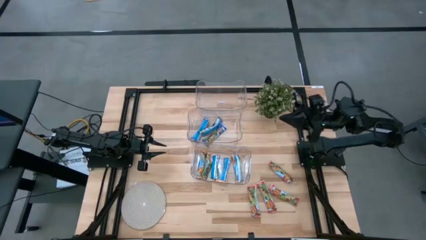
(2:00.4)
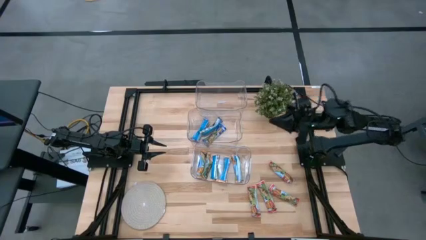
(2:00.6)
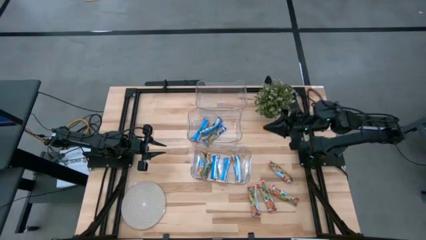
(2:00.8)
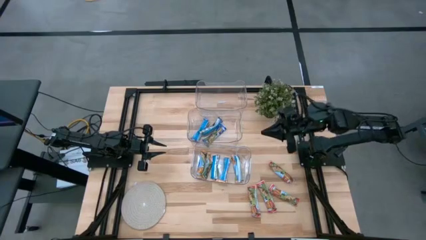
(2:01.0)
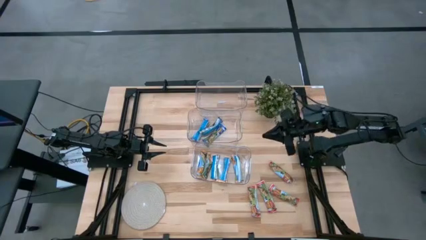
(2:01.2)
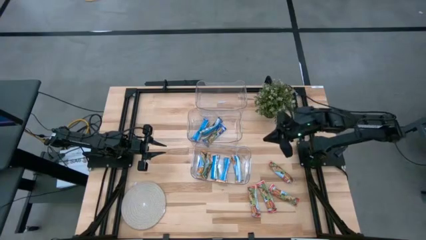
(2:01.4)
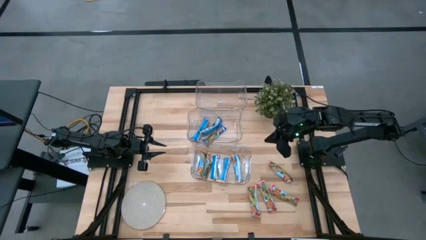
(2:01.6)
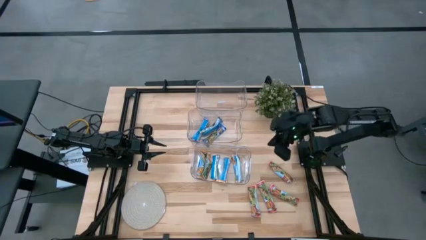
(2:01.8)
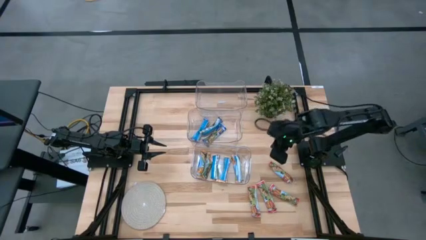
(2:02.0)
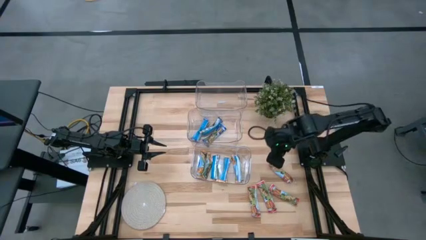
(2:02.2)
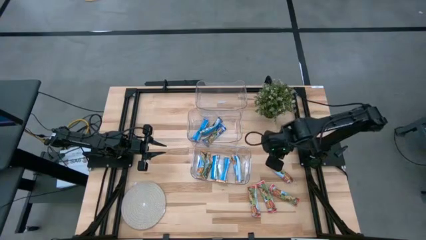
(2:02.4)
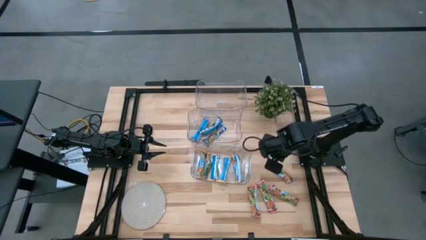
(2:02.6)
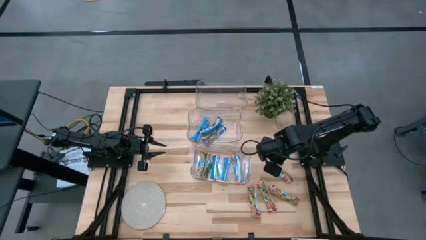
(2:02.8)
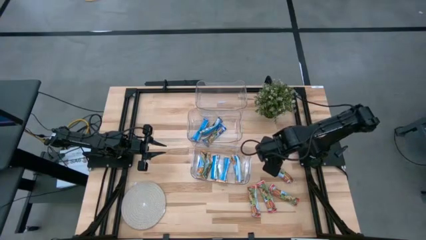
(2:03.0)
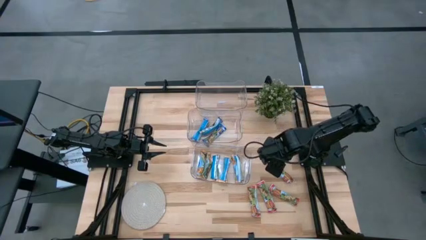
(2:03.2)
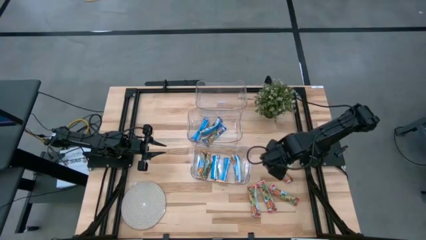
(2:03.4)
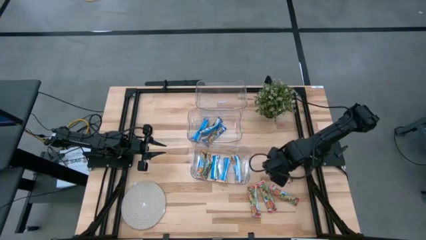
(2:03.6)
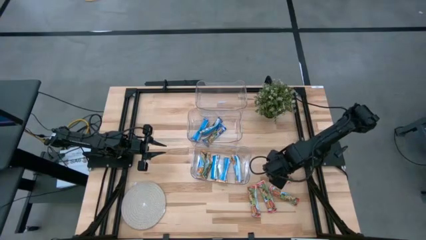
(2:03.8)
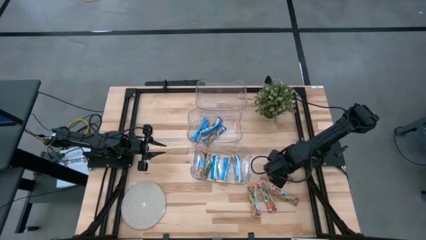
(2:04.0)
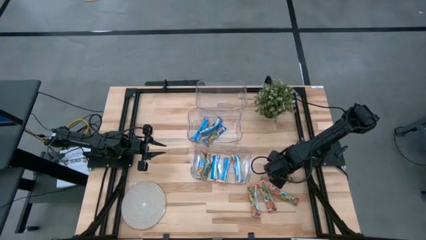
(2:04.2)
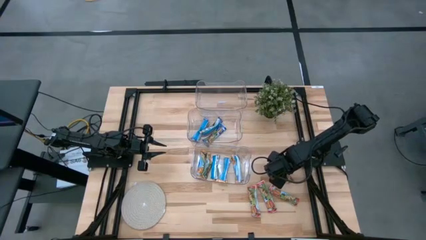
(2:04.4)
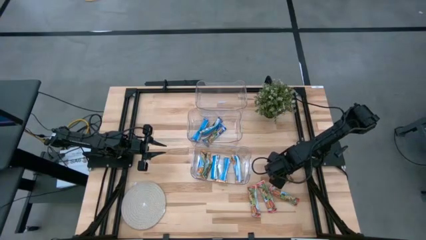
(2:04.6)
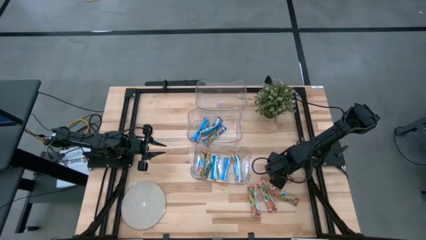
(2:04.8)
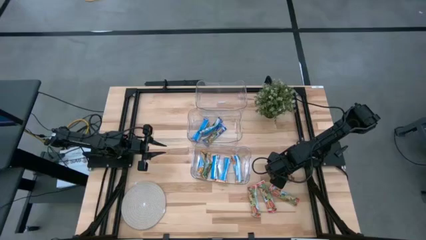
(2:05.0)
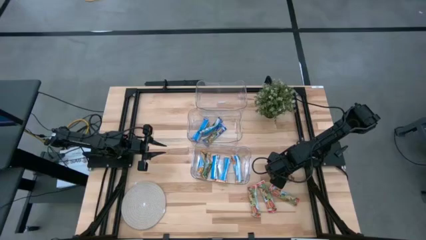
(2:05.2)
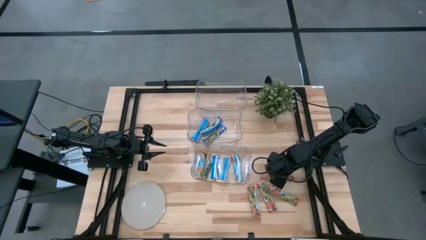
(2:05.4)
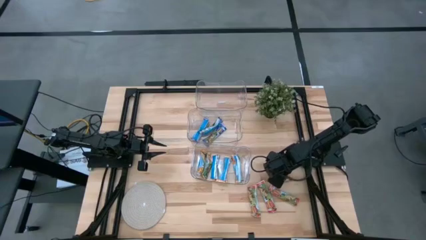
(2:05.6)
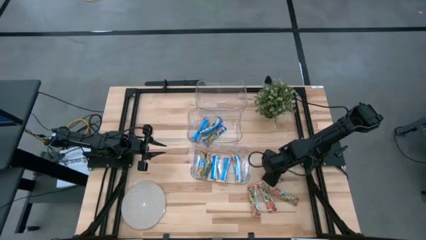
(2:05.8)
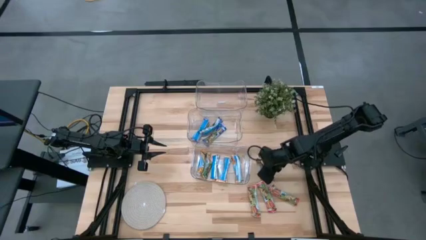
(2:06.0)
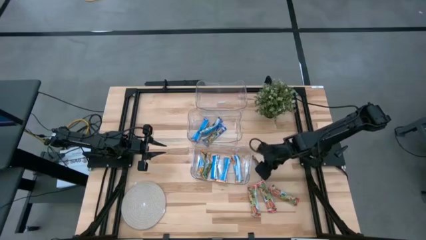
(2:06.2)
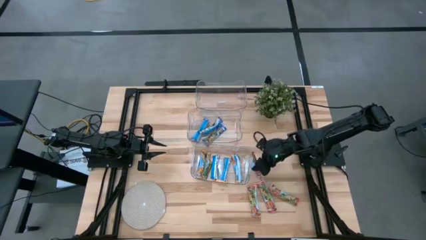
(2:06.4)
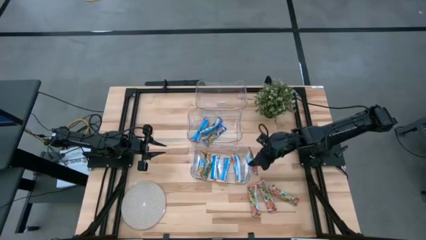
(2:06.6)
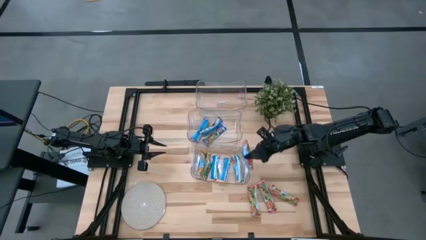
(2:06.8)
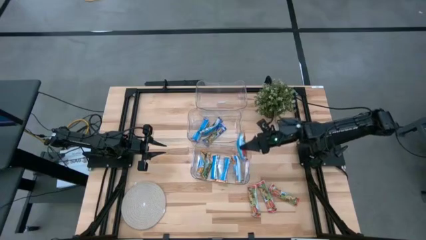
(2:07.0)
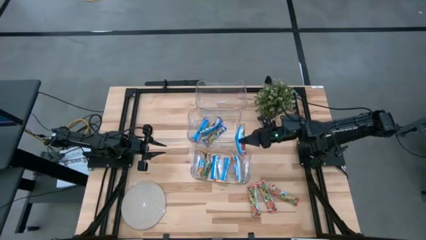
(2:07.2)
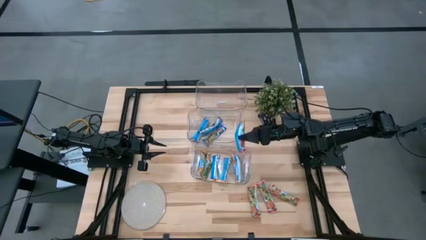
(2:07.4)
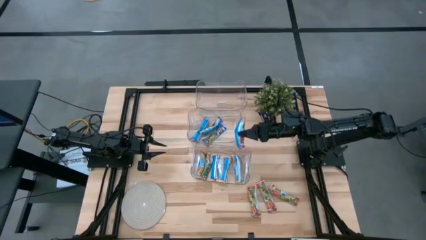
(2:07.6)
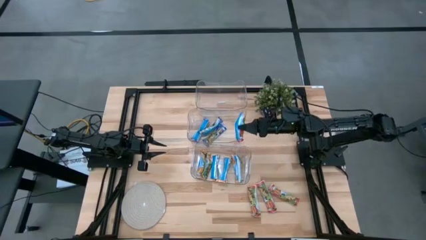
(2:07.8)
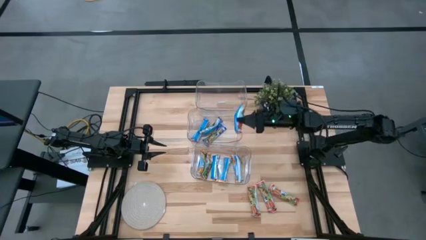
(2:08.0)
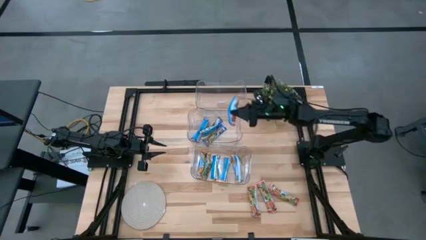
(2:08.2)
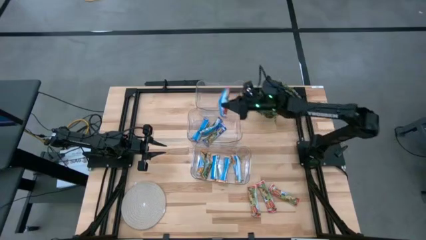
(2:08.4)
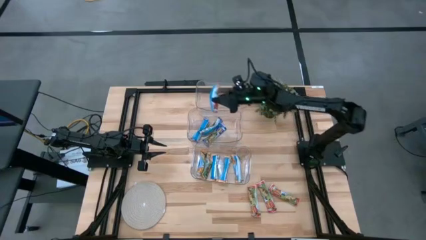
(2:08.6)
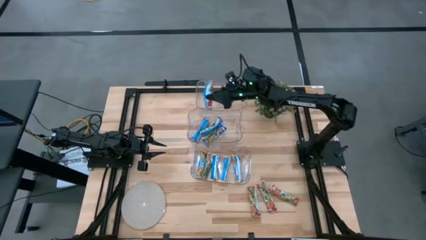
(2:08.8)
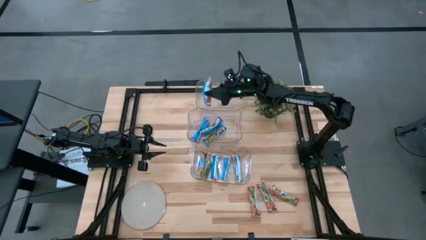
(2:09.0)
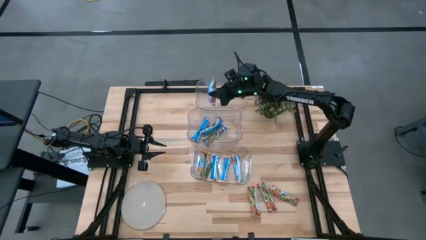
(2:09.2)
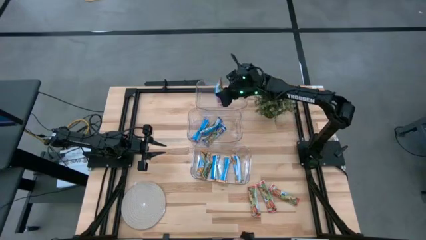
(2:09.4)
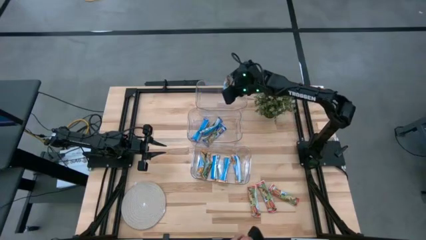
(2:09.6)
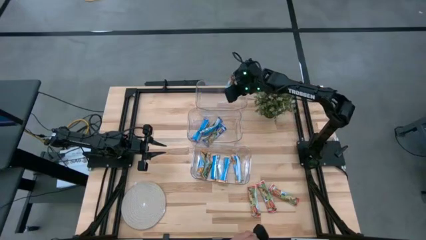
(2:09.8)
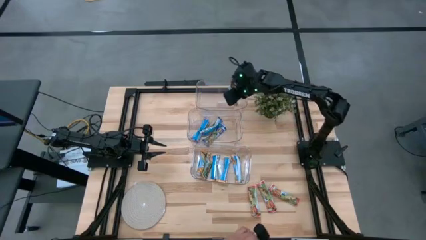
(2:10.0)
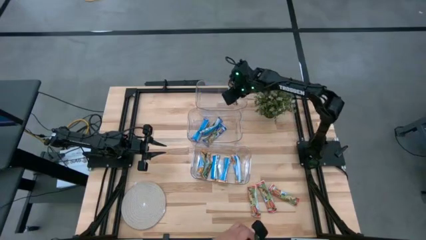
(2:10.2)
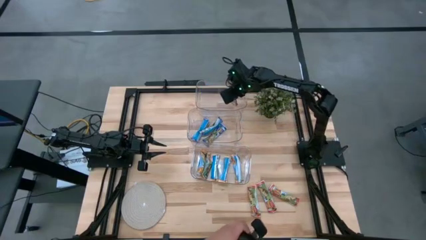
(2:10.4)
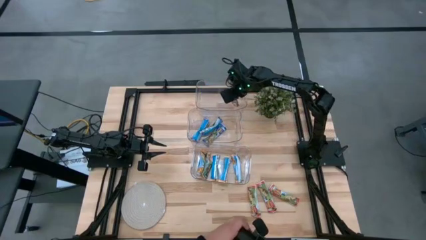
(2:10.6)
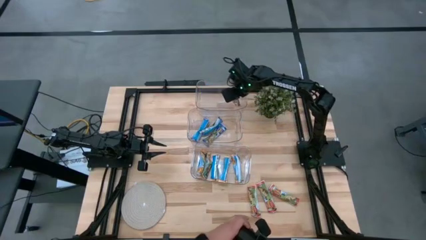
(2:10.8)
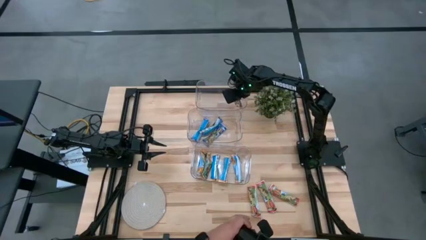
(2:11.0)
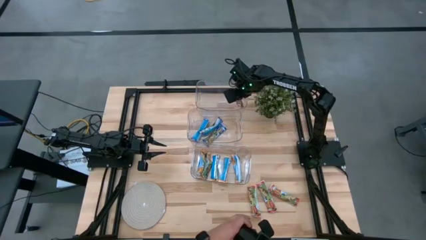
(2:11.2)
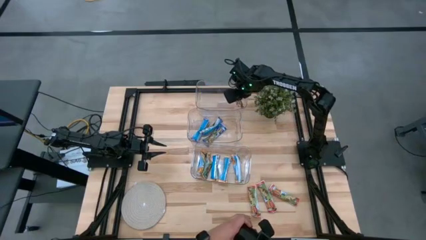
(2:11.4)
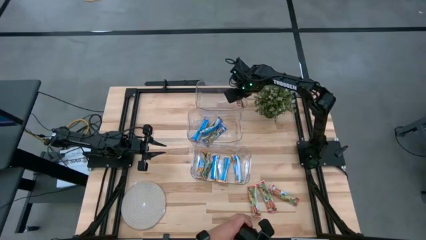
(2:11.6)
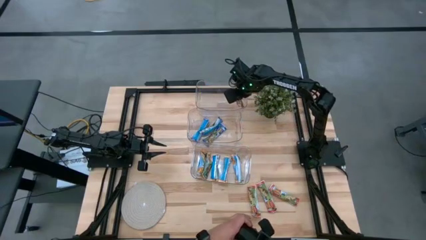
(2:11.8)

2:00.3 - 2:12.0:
Task: Pick and place Granola Bars by type
Put the red granola bar into the top transparent bin

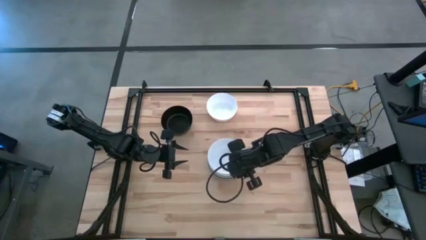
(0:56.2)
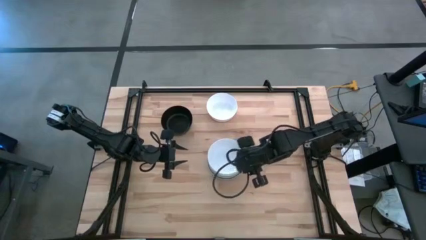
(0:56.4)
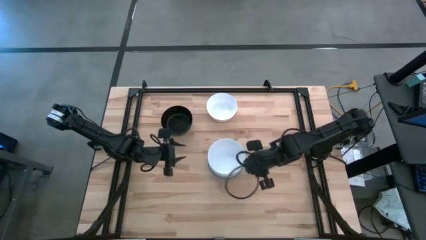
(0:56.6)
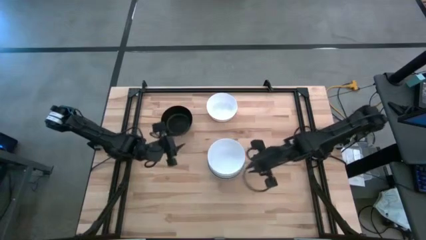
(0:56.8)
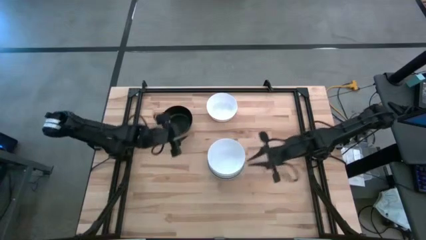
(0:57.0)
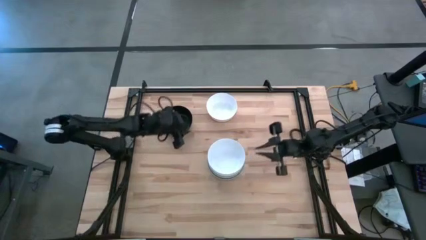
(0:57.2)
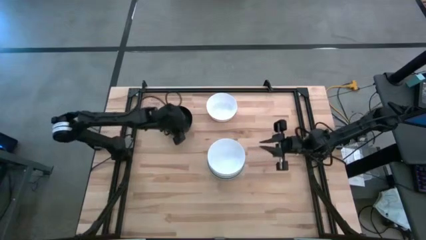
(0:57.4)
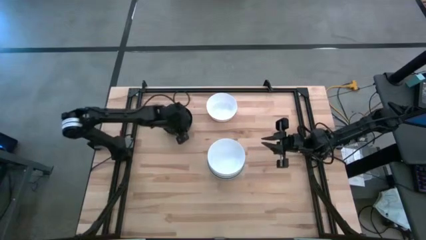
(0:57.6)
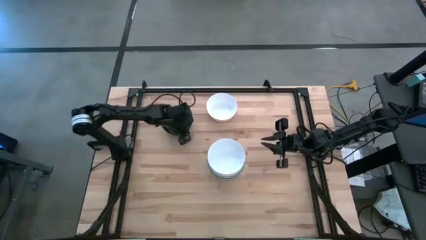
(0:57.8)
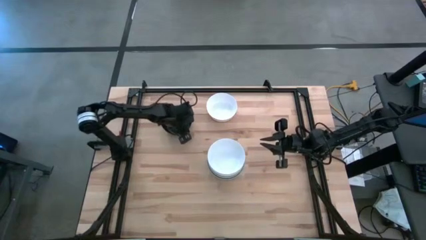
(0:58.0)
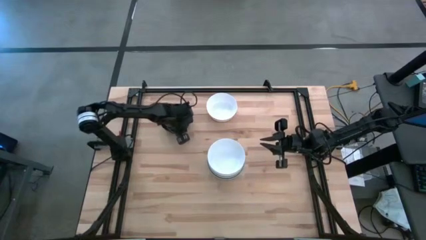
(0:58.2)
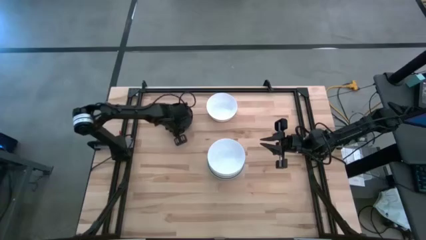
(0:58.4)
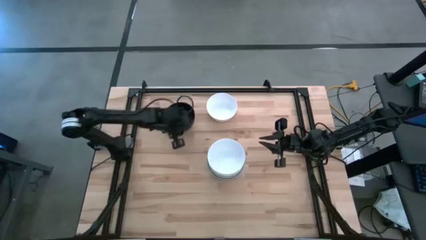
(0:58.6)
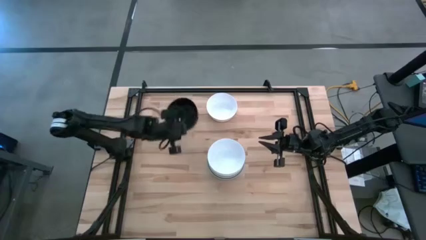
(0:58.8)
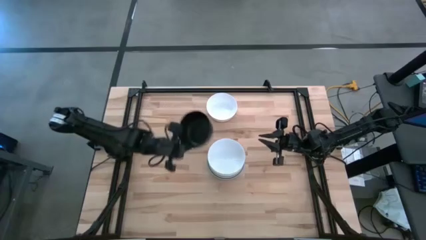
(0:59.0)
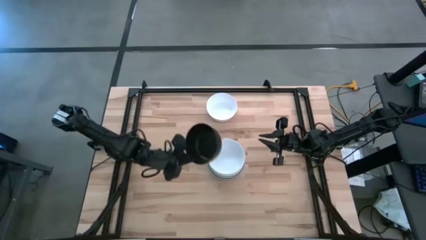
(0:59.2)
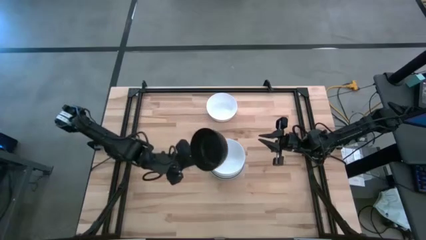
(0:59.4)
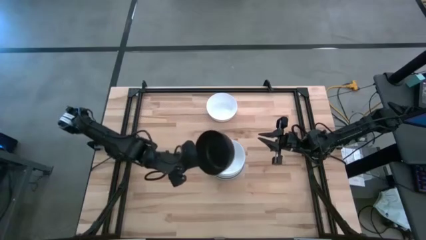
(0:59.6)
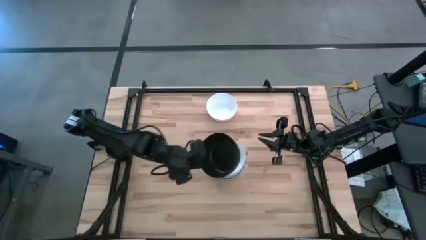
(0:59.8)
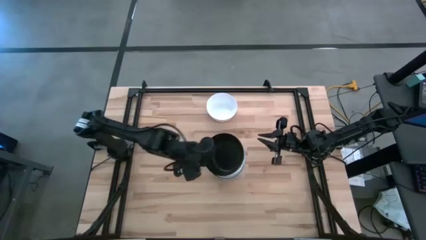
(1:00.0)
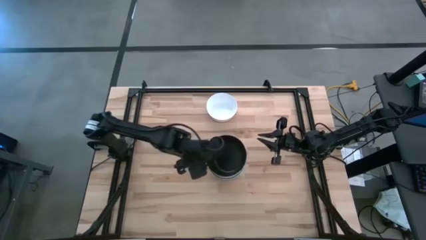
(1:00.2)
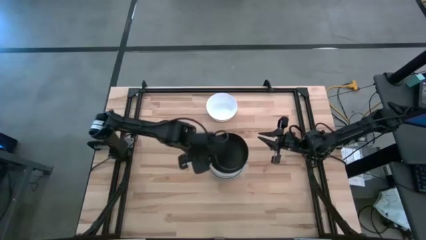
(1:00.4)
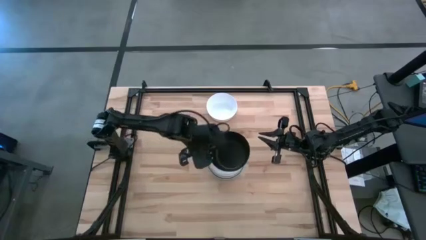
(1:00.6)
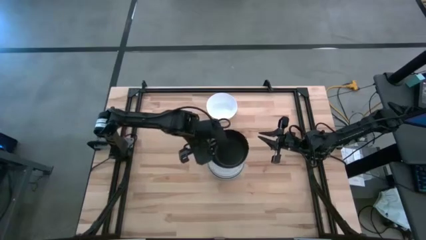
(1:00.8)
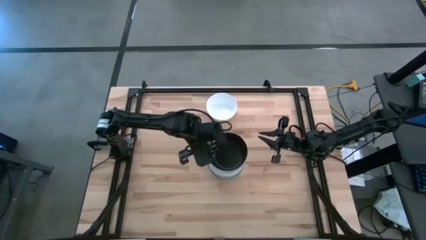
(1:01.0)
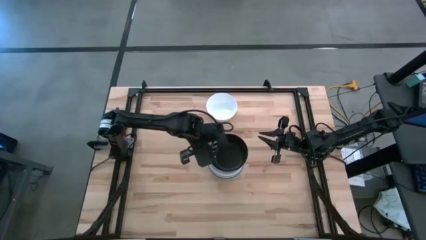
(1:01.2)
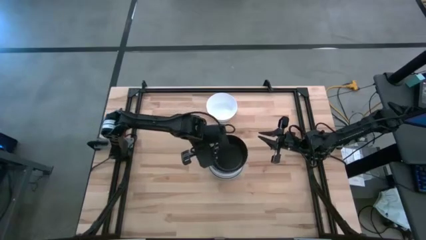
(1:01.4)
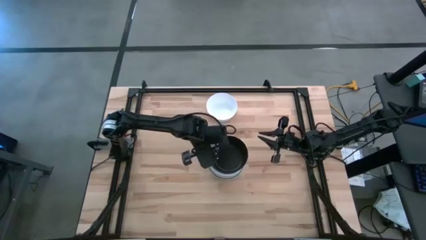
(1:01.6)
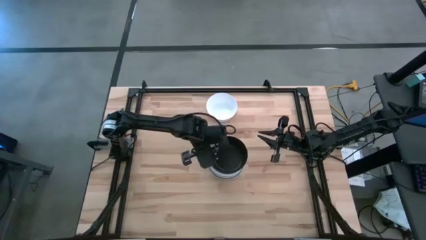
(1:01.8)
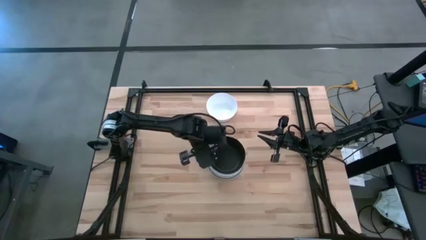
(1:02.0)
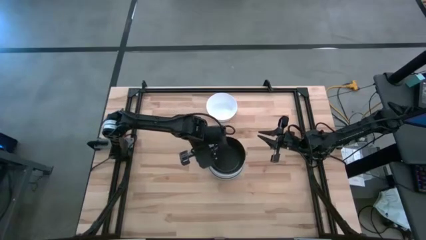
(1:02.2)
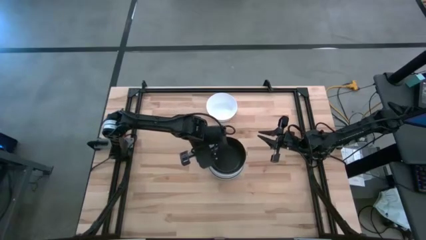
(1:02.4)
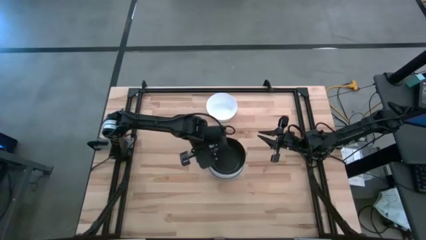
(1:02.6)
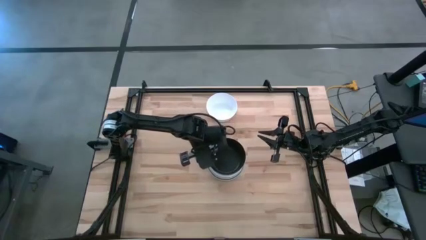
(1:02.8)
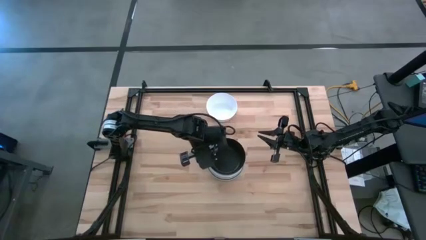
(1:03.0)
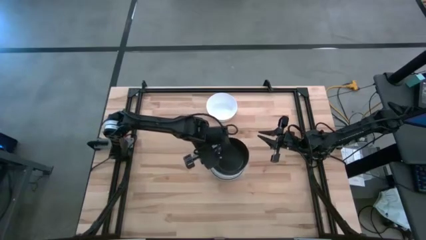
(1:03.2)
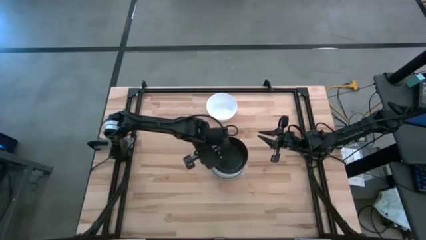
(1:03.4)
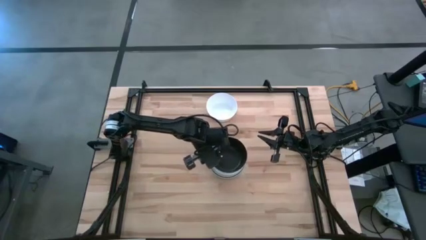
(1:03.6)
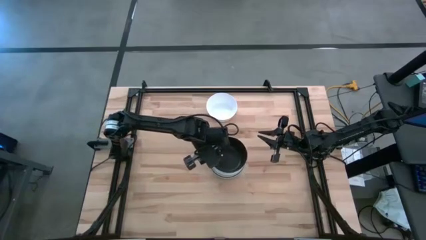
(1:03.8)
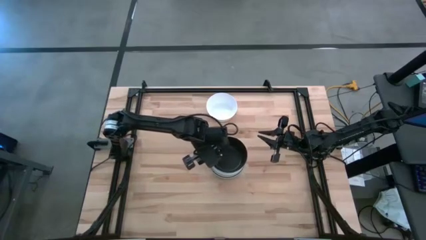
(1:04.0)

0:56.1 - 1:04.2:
Task: Nest bowls inside each other
Stack the black bowl on top of the white bowl
